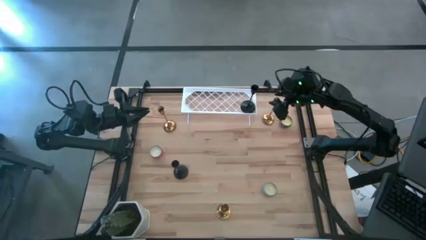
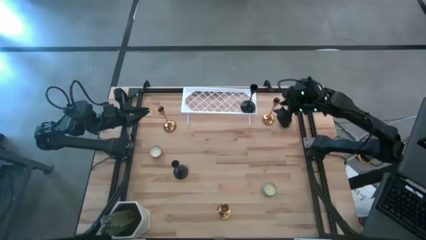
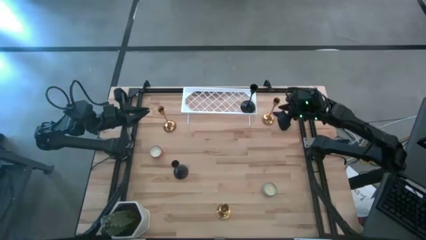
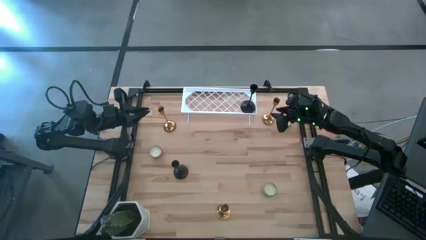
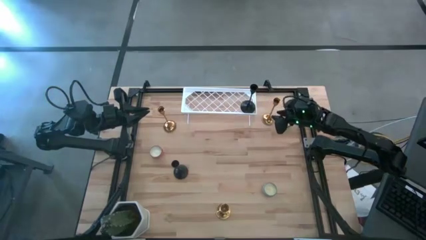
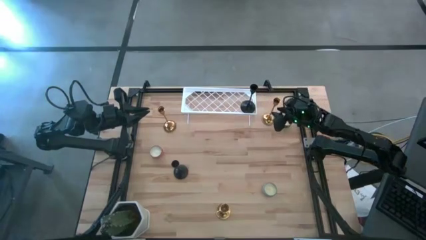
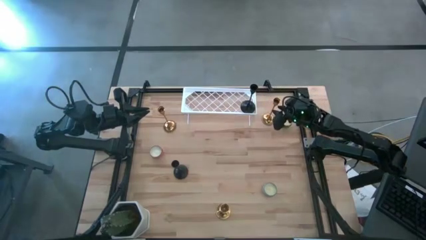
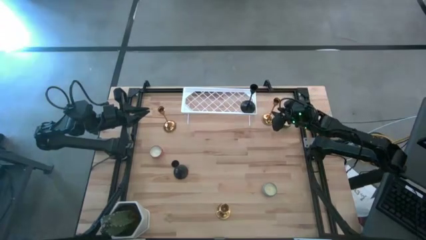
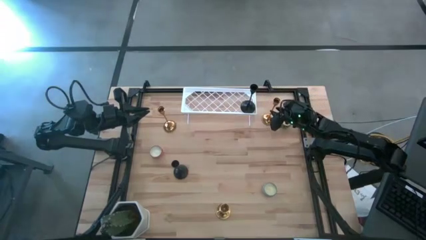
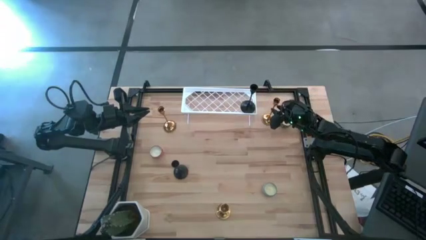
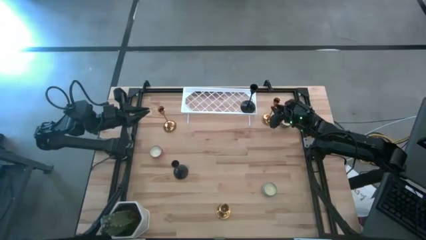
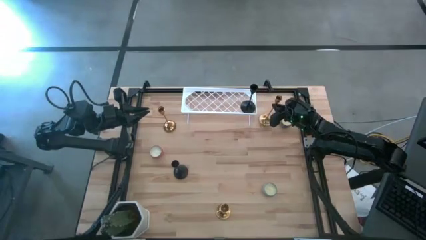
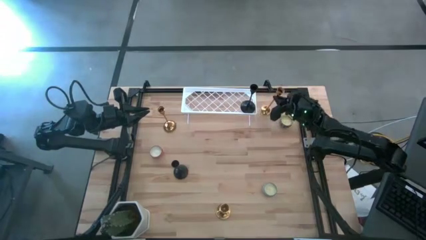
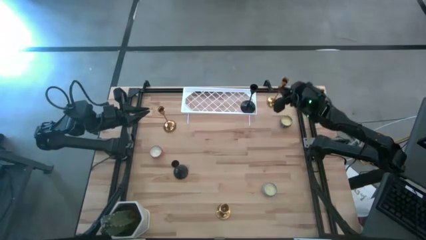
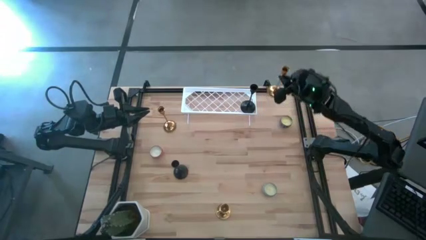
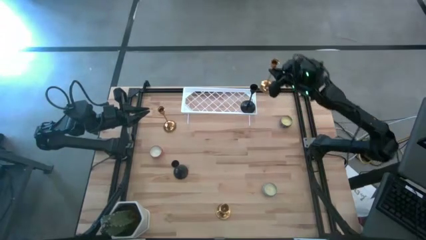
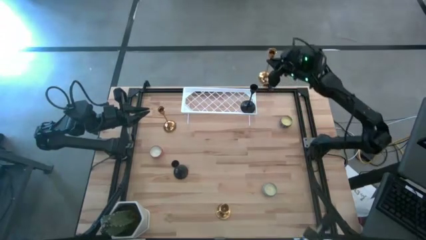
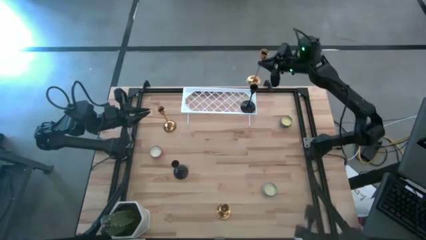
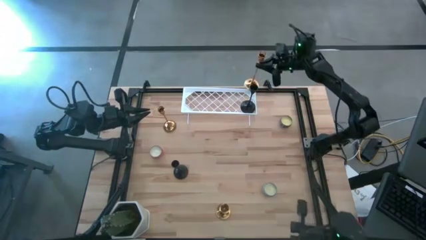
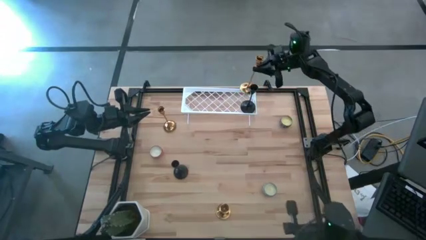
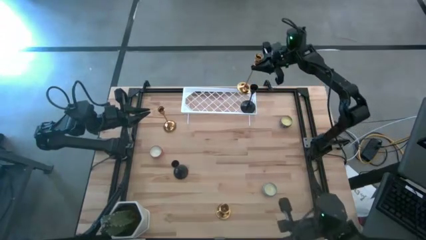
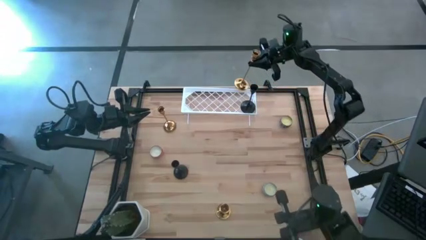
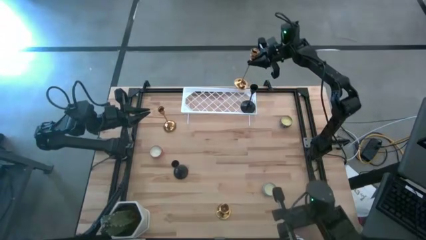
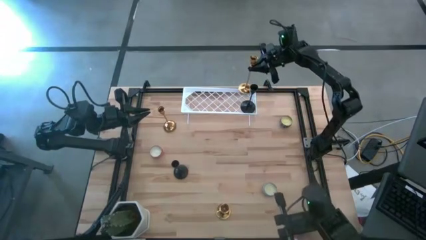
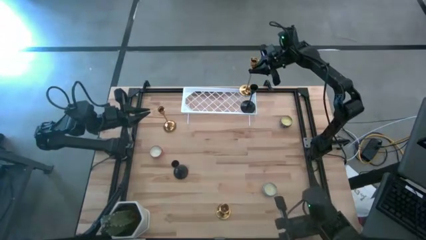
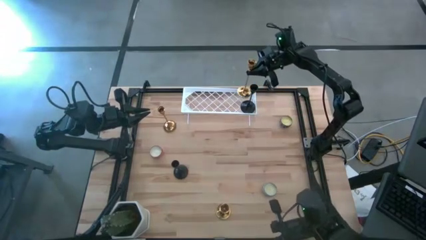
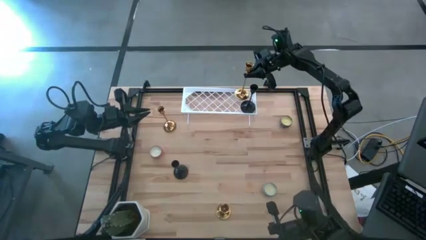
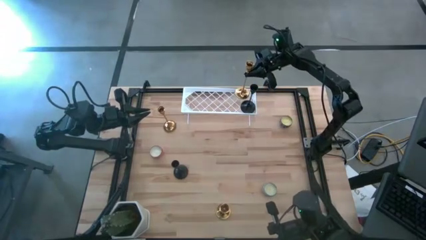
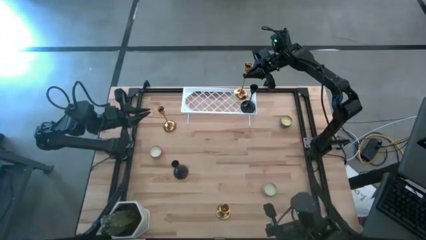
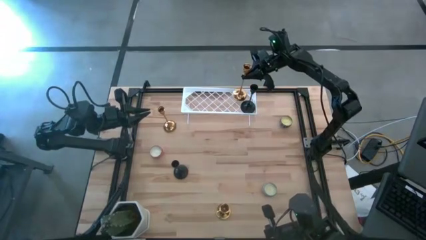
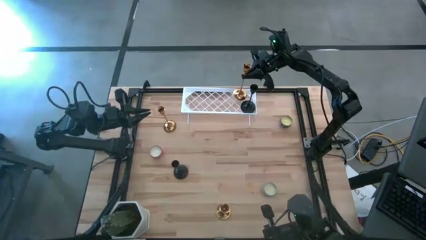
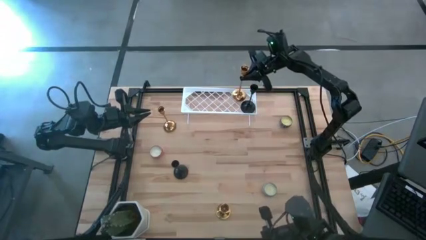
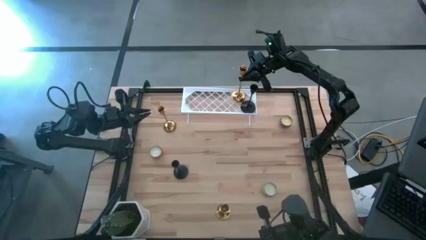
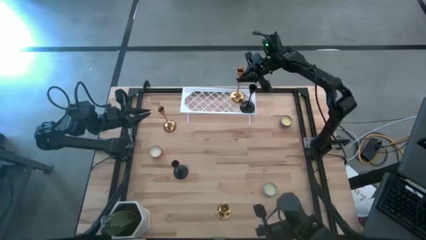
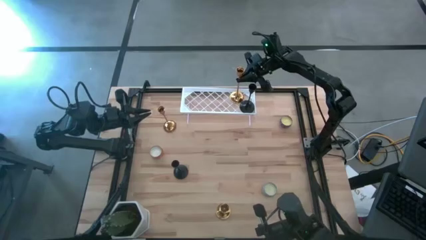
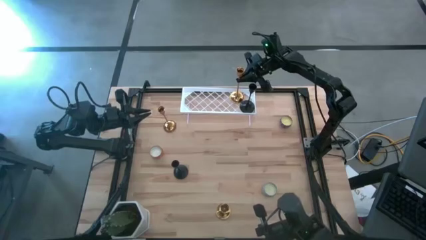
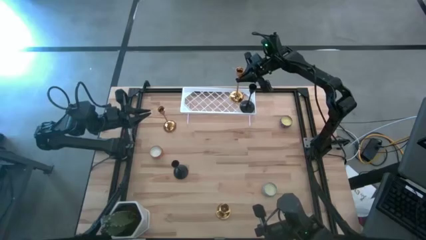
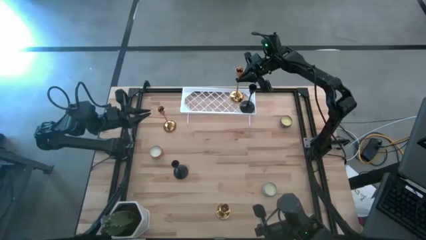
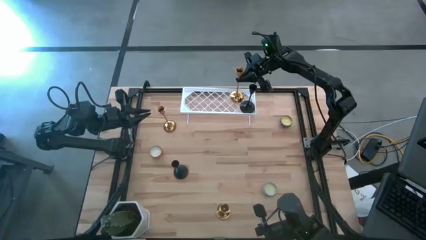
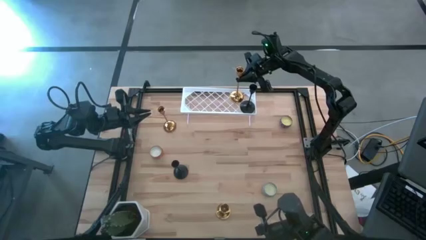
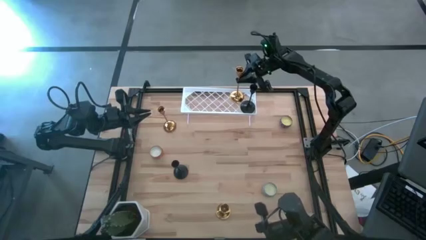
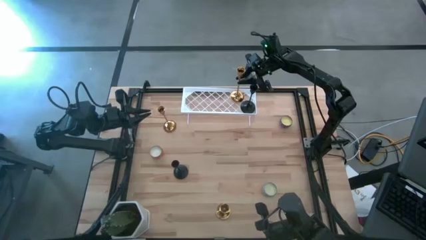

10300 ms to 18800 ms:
Task: Pick & Place candle stick holders
Put the top right gold candle holder on the shelf

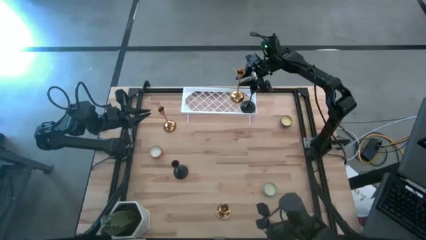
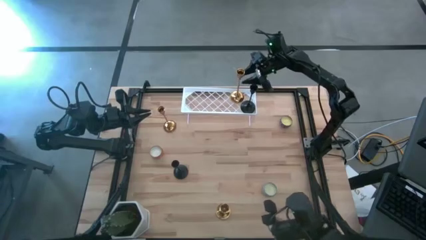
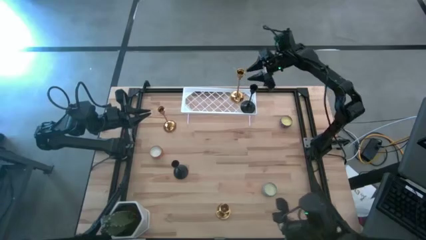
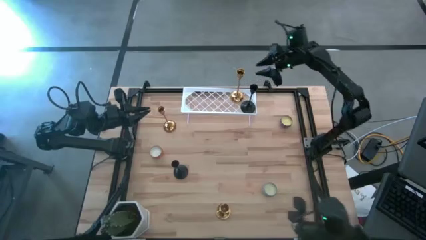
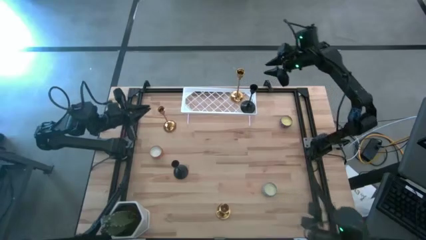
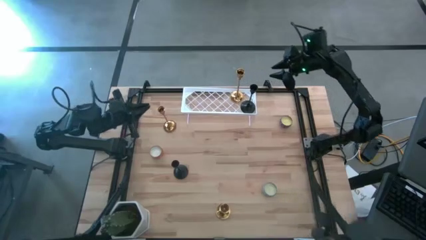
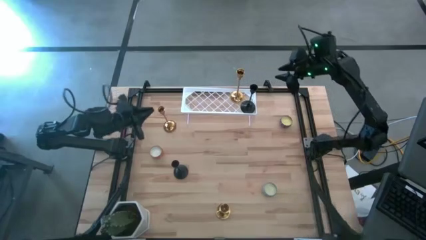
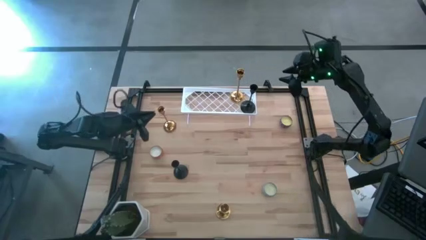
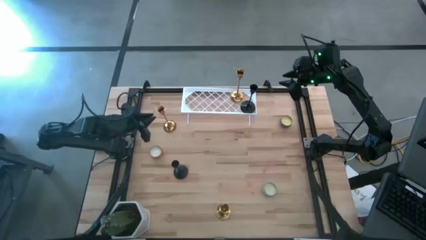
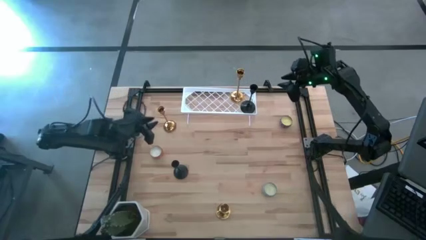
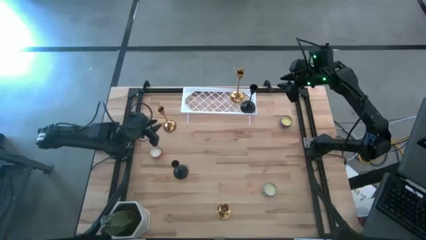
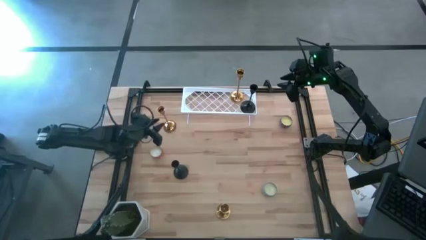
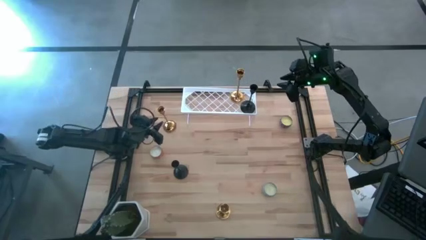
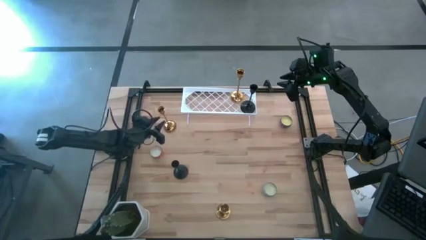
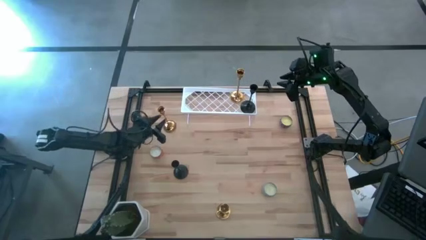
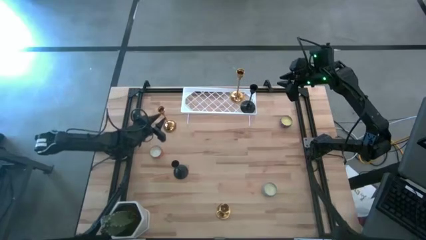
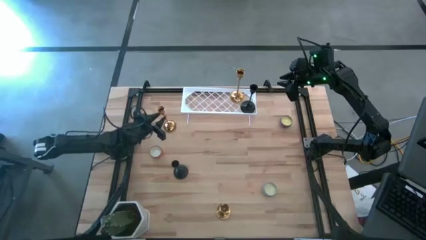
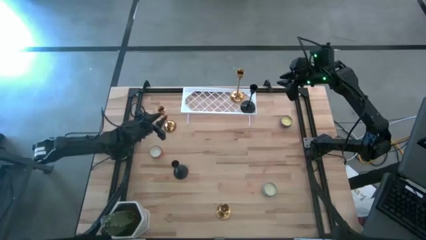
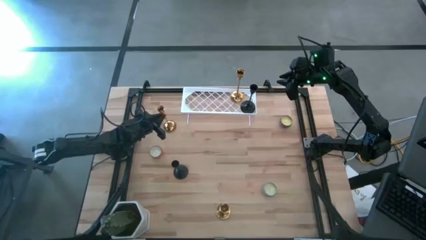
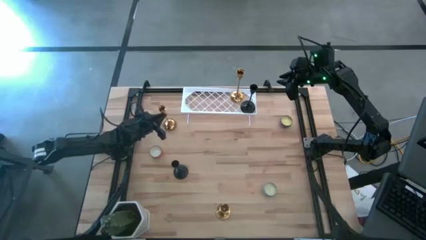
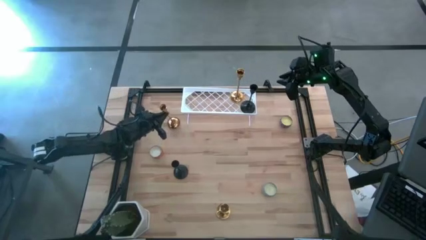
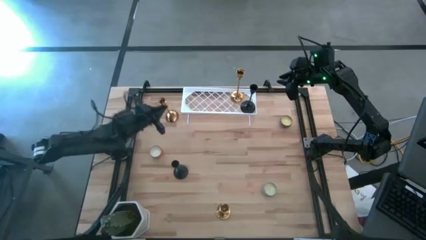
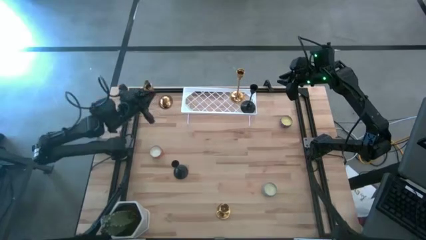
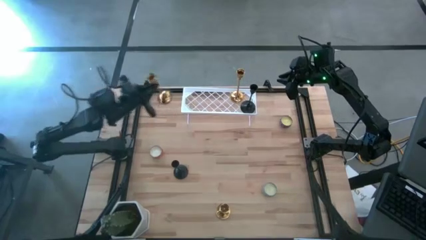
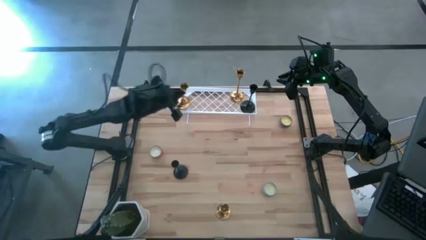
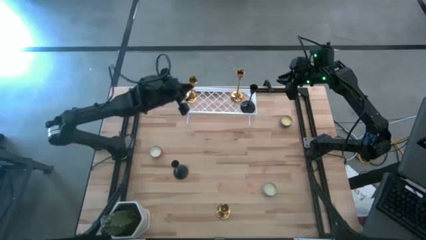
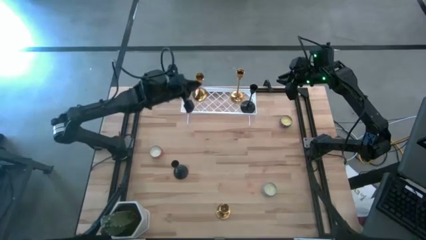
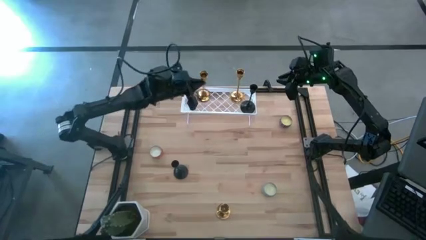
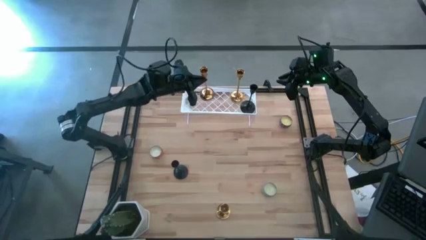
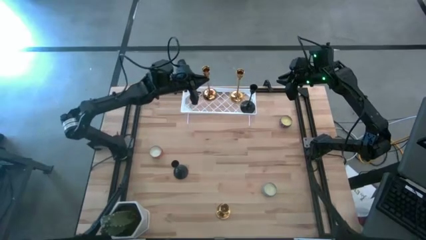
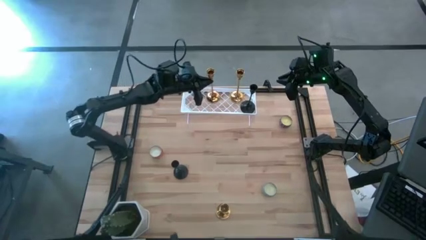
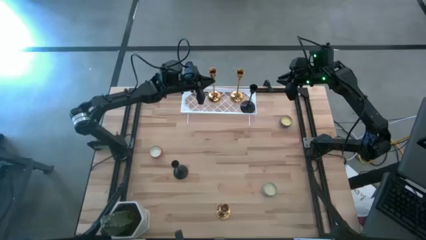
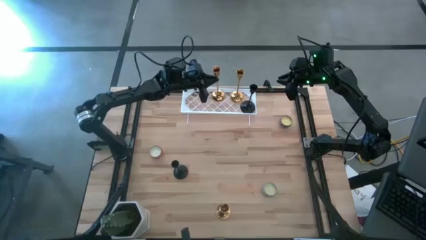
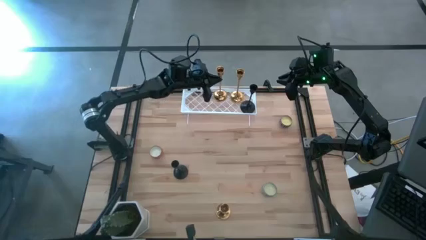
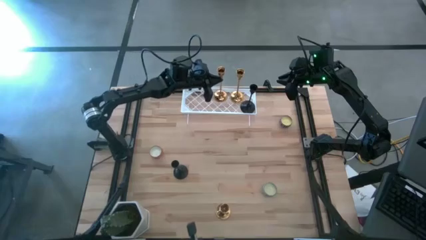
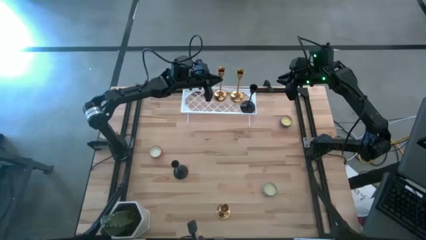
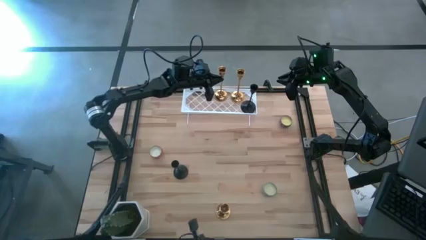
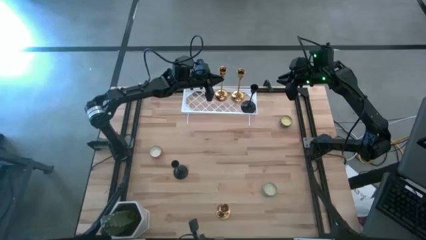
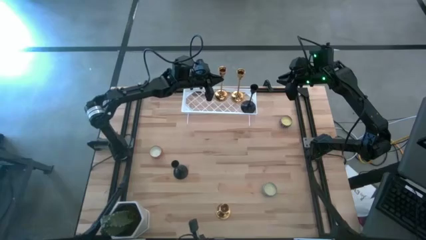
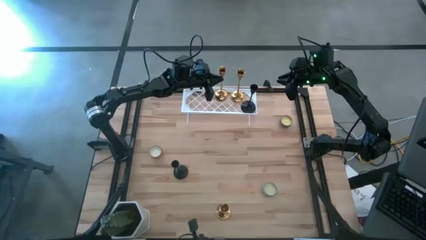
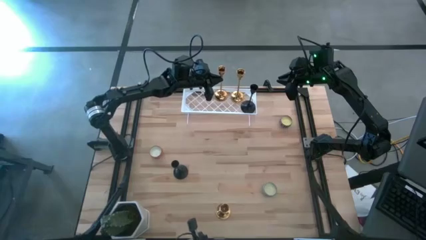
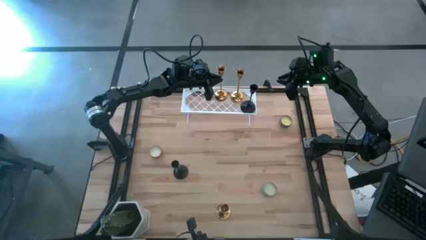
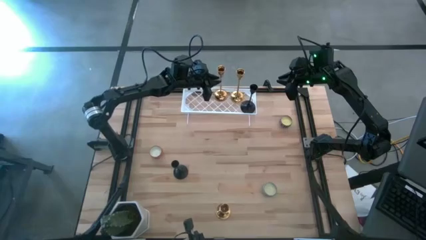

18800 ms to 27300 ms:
Put the top gold candle holder on the shelf
